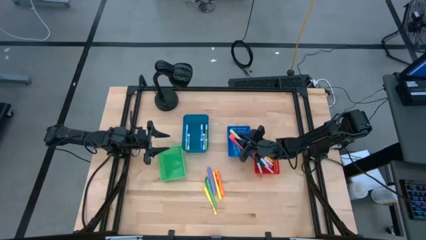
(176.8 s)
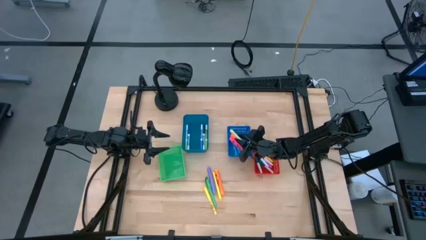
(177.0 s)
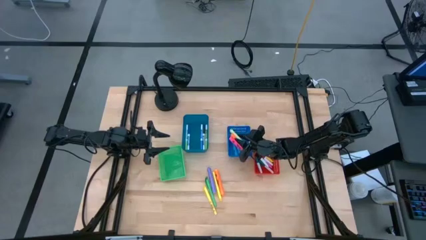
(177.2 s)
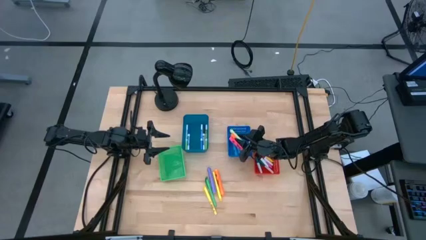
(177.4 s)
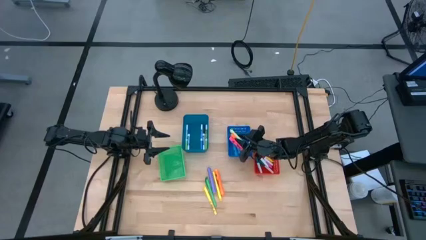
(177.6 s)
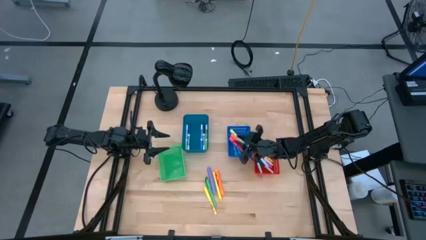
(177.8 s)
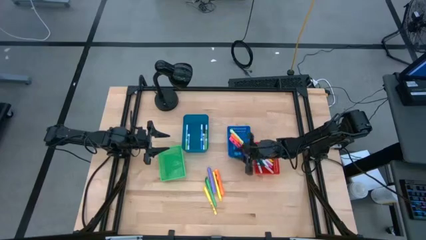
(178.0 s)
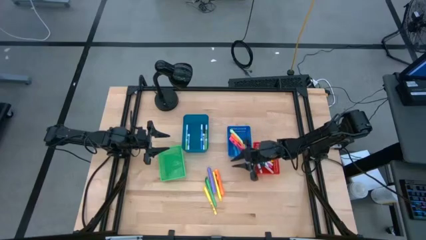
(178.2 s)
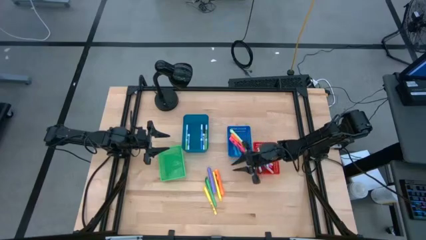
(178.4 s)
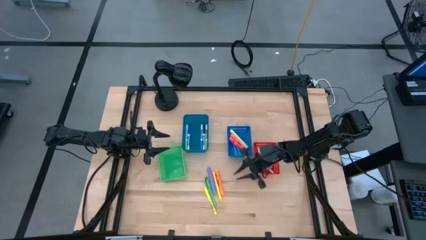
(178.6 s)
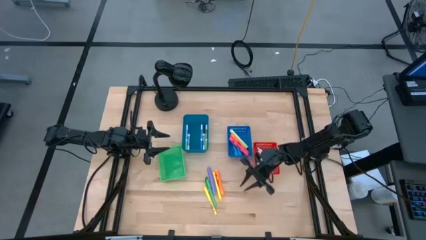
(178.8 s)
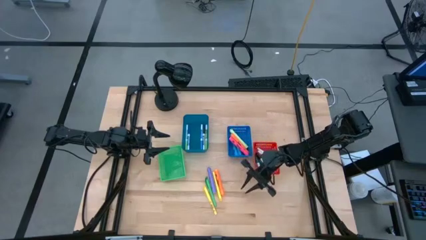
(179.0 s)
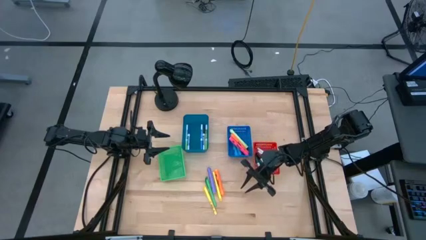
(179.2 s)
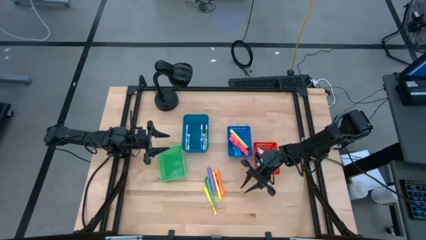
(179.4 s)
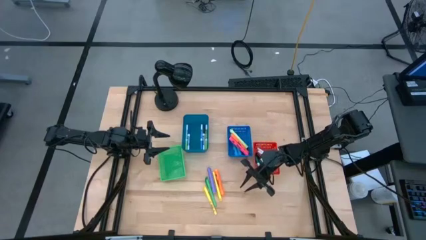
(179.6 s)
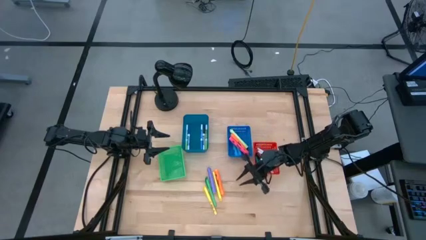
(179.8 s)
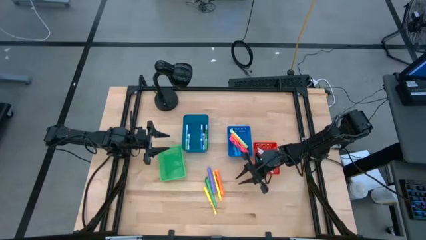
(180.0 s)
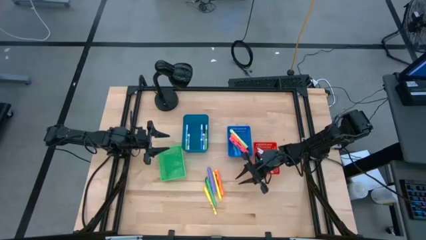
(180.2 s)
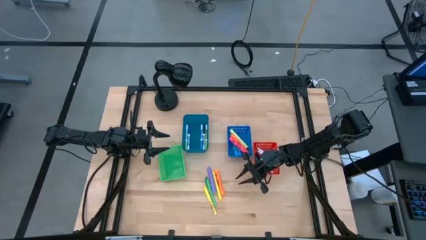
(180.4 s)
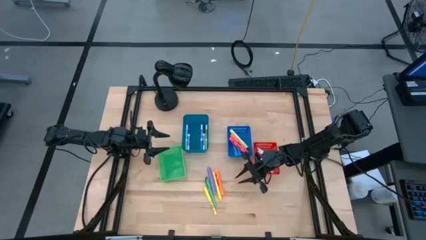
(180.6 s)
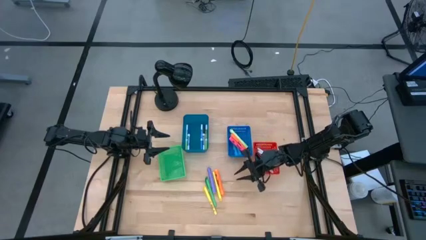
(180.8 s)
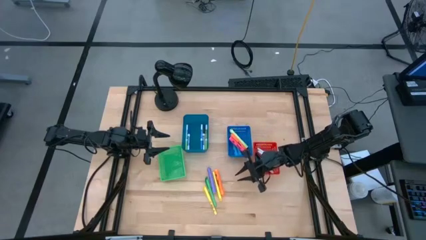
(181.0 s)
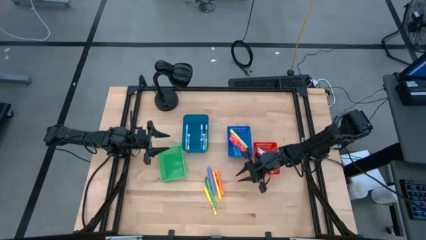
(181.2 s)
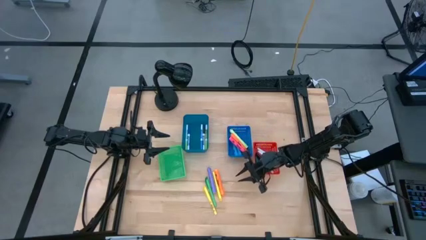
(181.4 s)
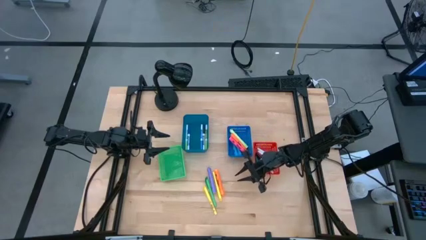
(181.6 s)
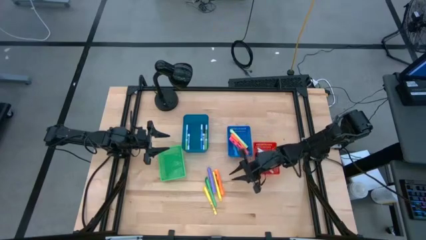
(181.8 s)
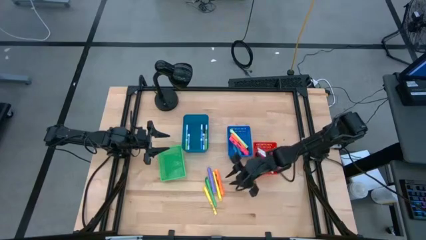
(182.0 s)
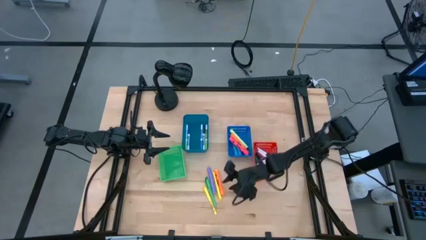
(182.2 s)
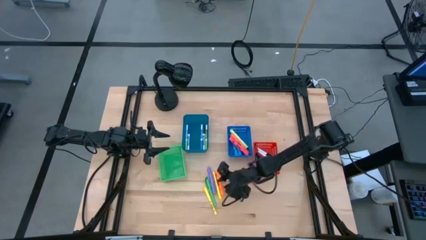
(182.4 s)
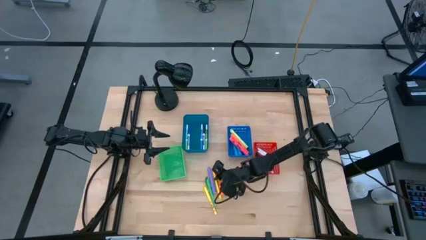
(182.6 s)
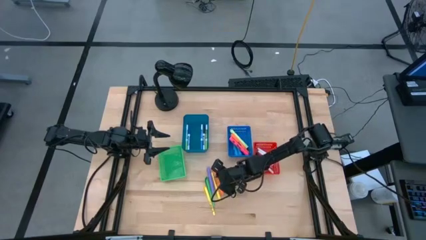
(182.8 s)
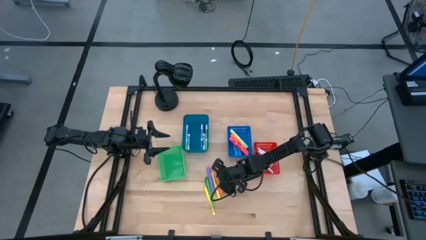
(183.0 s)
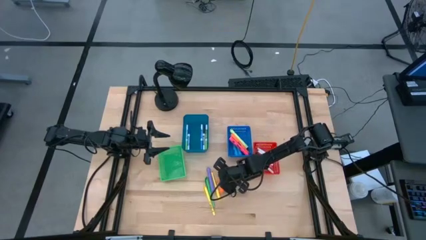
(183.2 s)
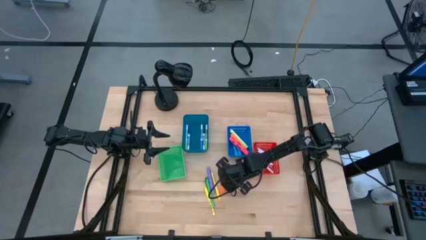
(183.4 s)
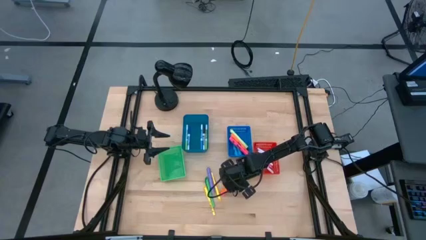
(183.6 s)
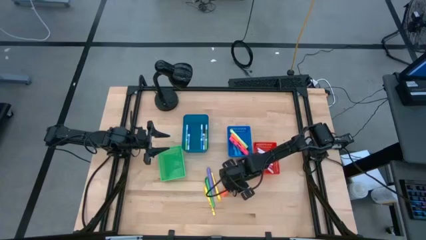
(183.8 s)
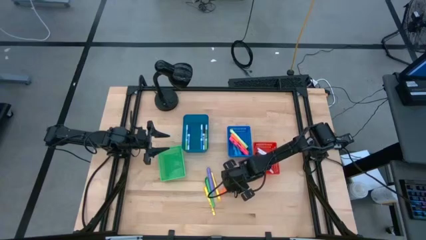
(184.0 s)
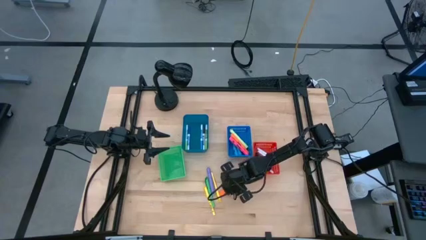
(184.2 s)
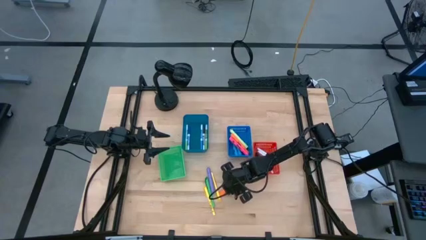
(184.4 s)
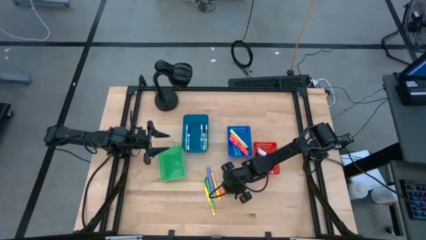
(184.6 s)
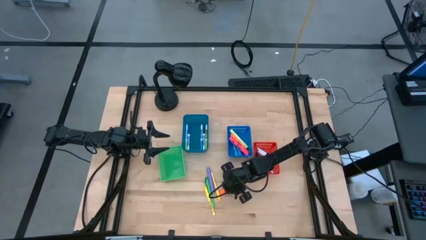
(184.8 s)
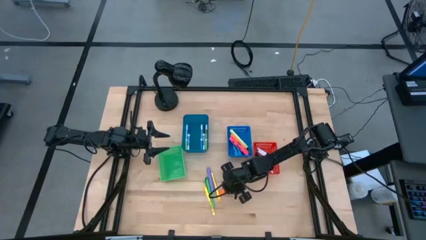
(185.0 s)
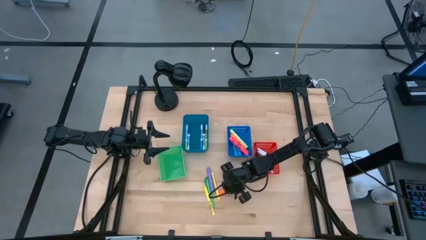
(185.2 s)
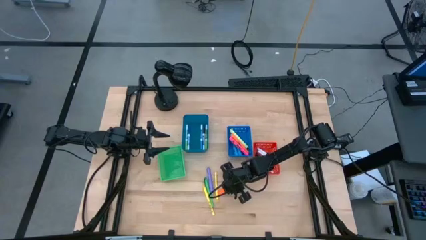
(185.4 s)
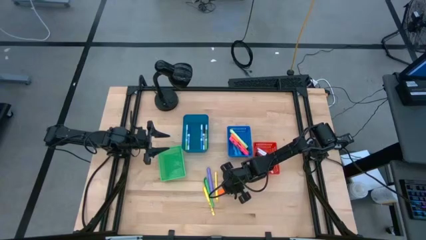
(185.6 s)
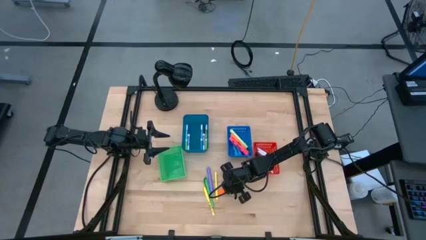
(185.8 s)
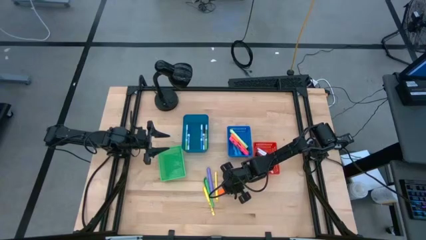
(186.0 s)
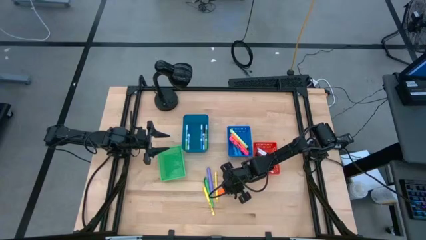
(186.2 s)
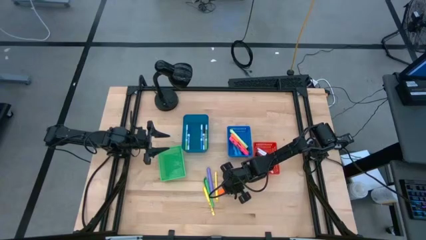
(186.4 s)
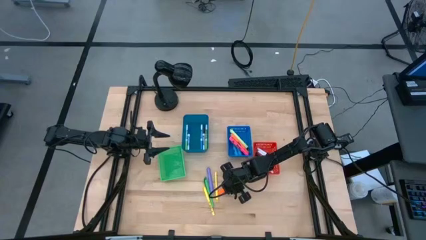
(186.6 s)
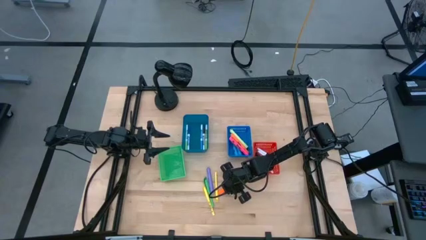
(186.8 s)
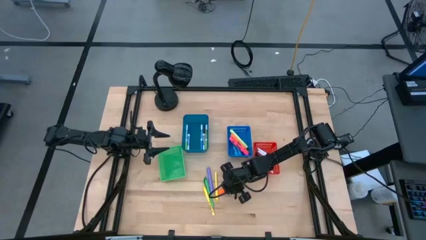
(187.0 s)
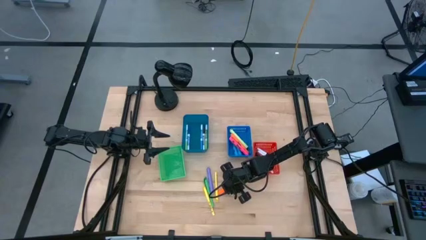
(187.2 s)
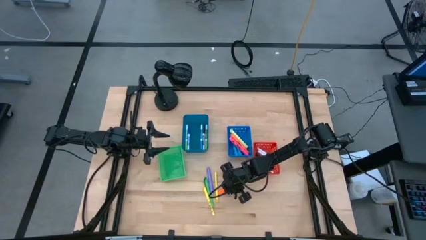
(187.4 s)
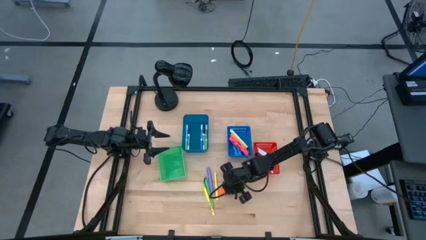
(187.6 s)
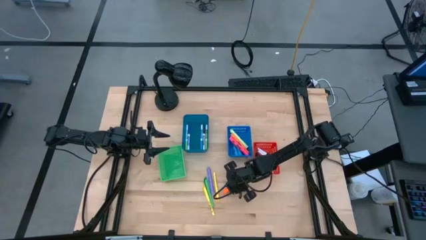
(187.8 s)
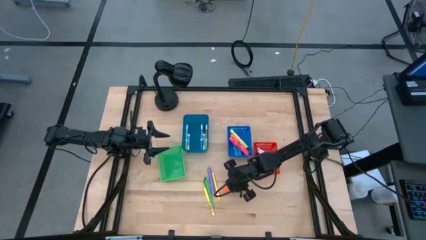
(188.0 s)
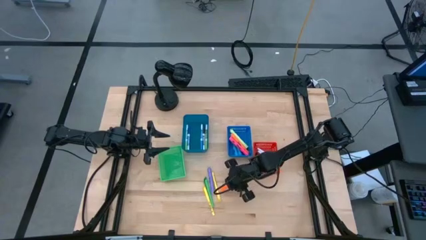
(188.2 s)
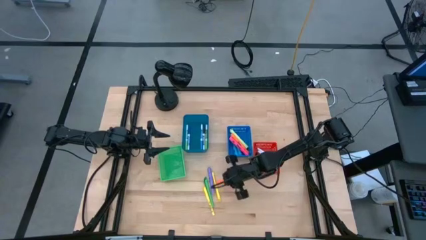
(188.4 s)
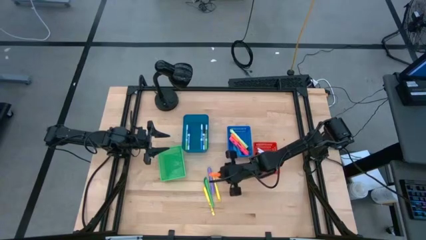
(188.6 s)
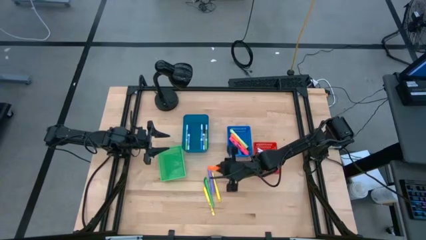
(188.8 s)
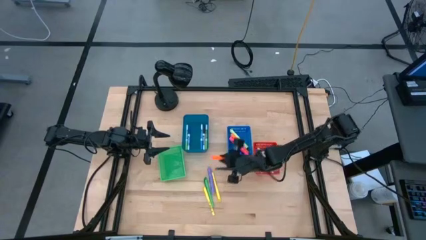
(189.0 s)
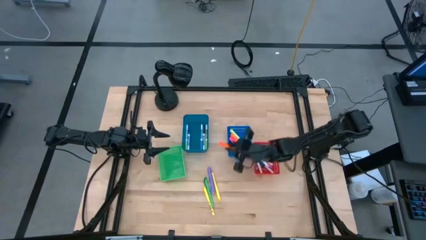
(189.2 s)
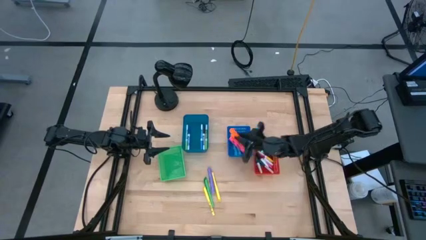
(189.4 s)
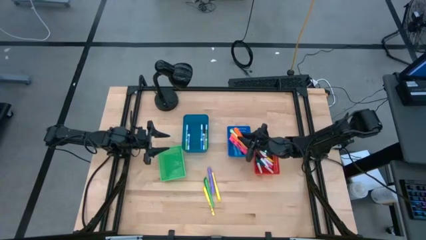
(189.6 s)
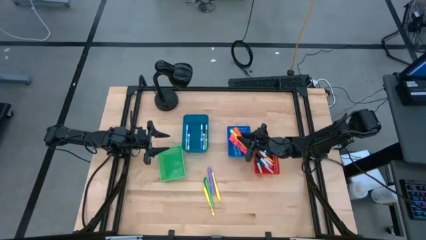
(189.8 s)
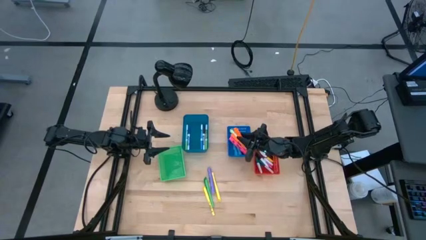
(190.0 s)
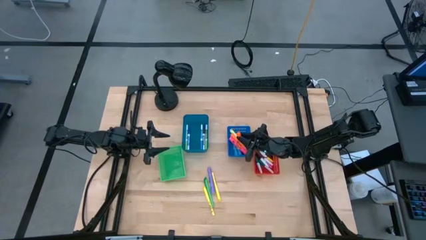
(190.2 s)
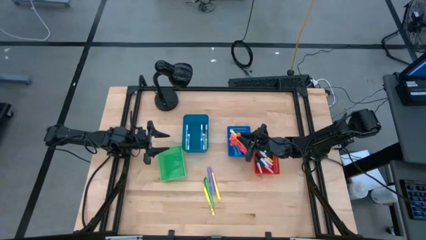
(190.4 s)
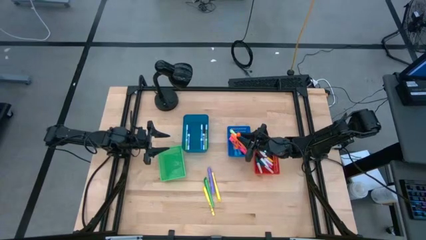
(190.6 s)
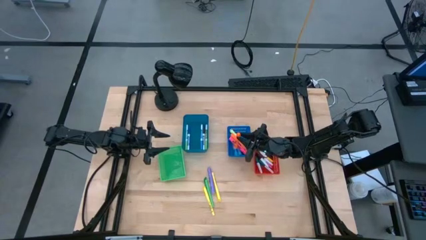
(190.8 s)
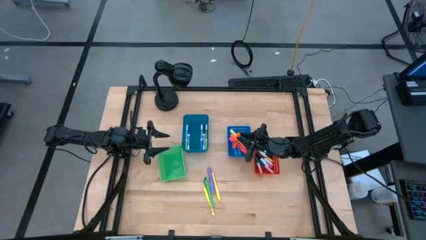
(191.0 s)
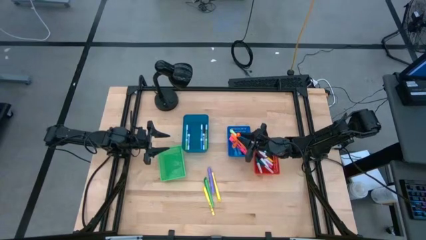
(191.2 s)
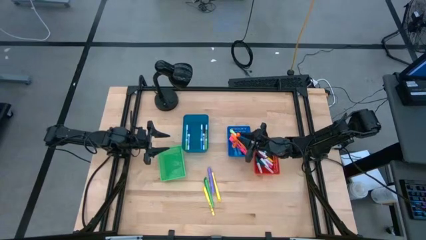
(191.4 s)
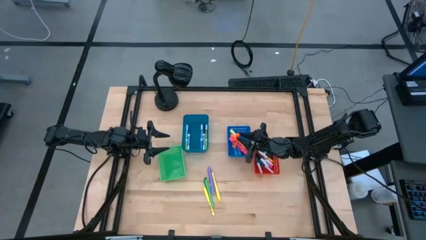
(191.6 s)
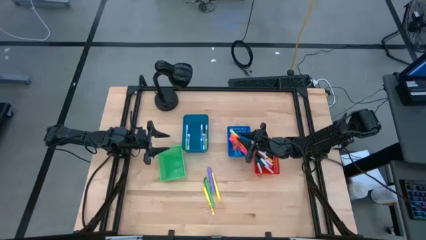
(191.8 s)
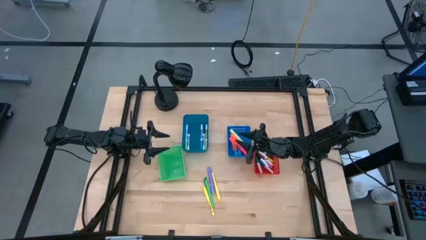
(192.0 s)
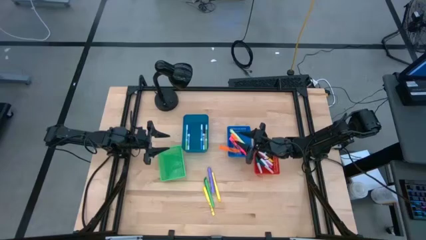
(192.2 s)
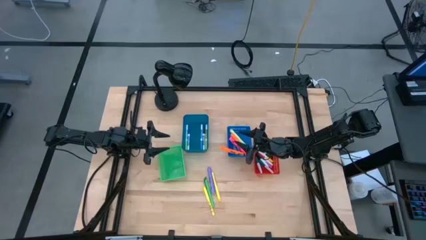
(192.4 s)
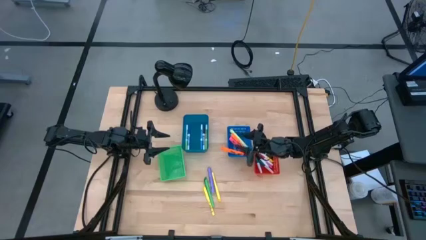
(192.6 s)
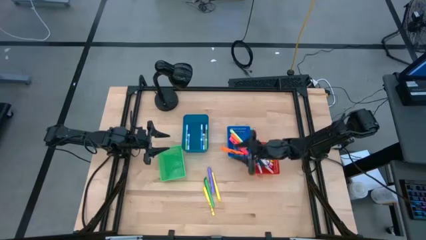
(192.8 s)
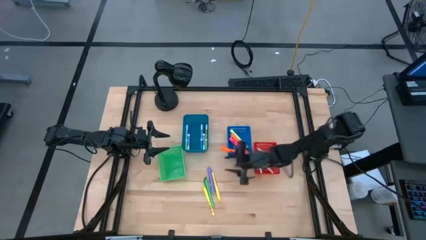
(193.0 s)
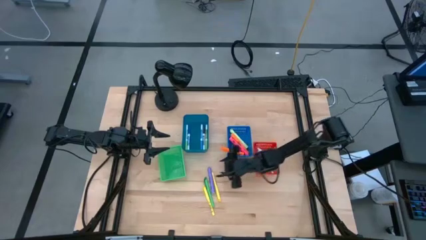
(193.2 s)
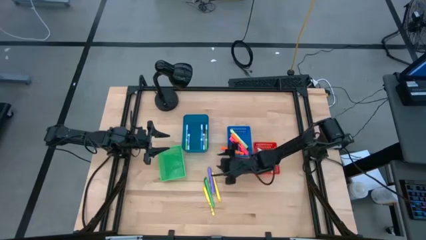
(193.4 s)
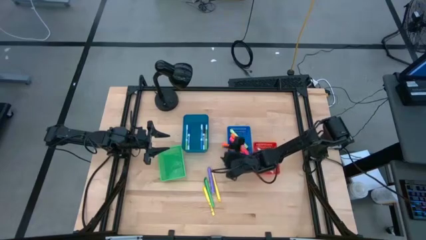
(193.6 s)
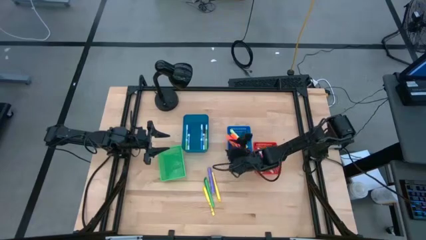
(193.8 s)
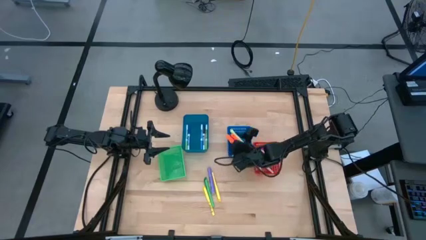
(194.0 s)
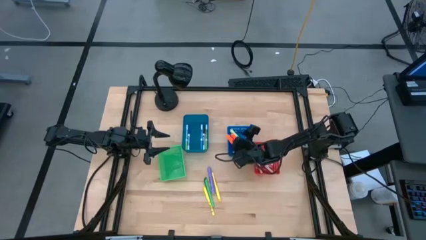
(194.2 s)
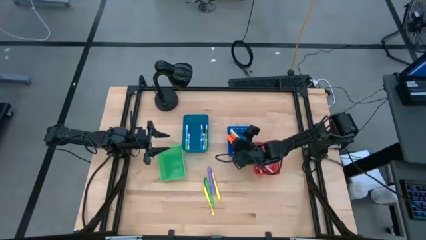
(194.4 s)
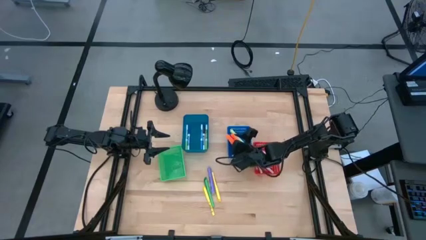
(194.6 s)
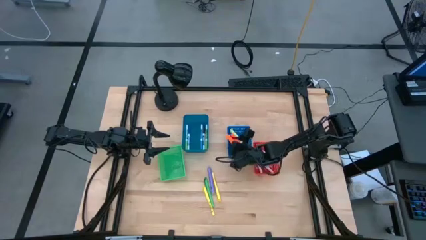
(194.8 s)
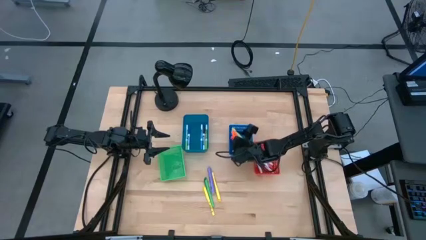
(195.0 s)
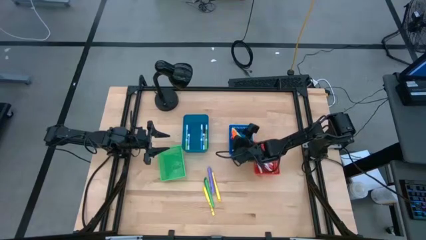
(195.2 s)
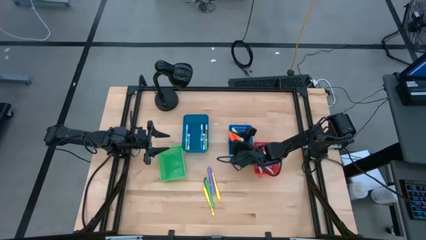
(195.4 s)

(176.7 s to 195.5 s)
Task: Pick & Place Markers
Put the orange highlighter pen into the blue bin
